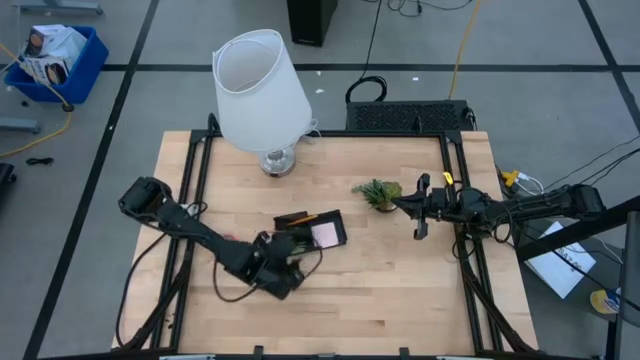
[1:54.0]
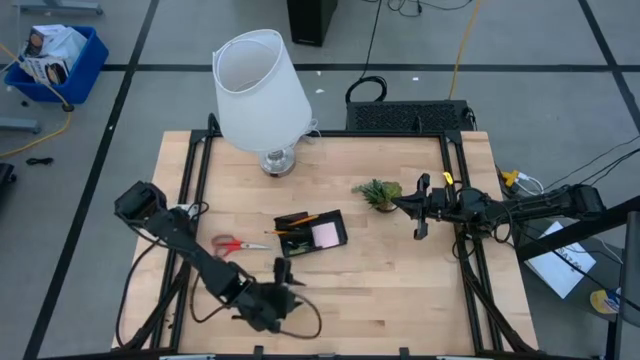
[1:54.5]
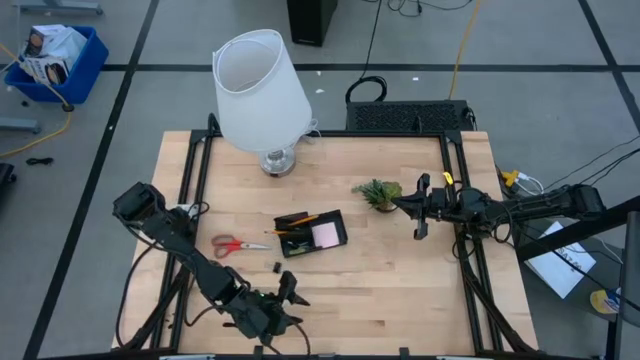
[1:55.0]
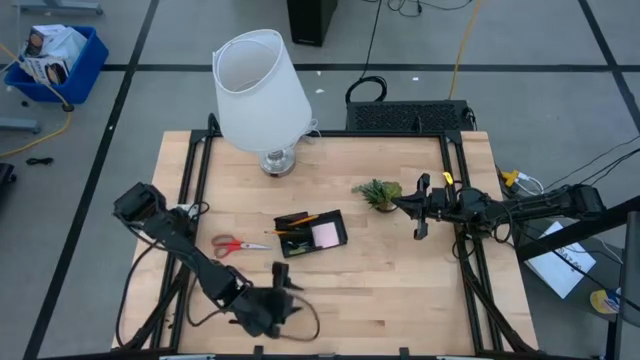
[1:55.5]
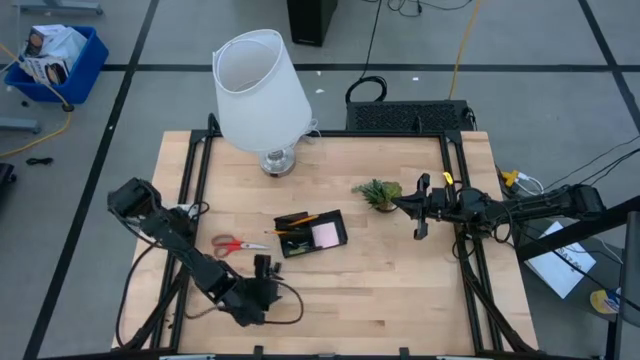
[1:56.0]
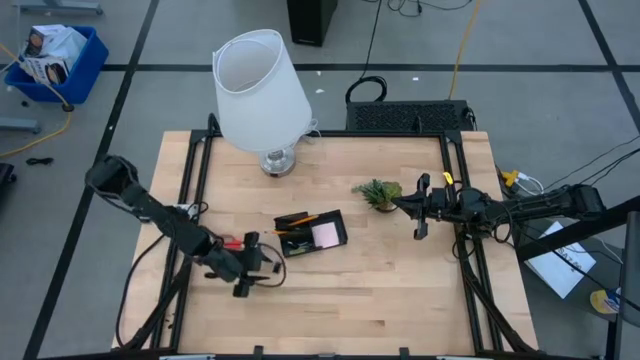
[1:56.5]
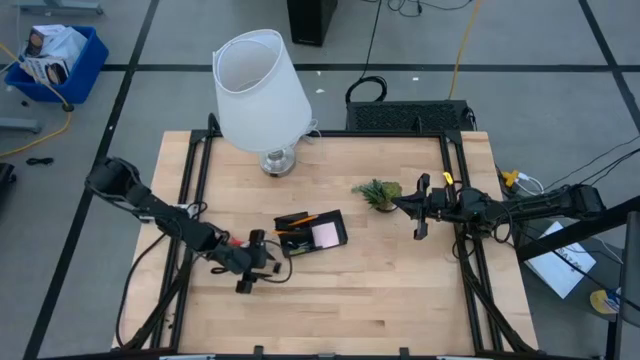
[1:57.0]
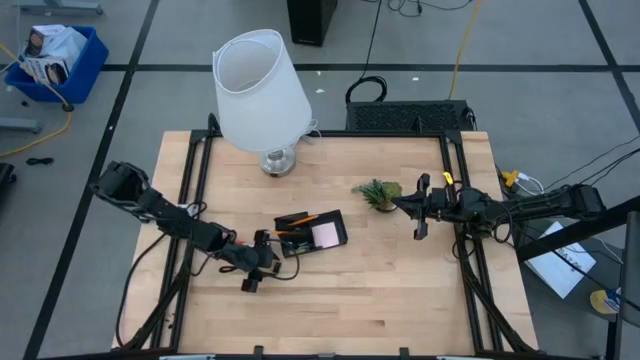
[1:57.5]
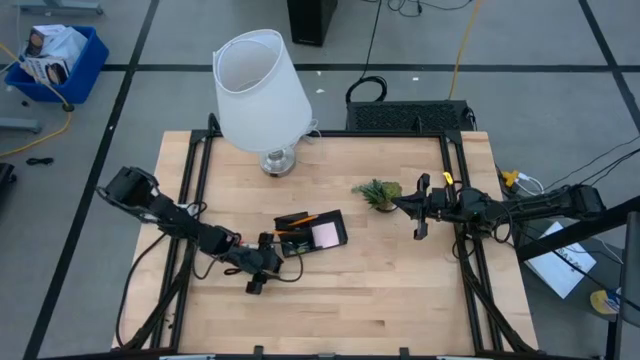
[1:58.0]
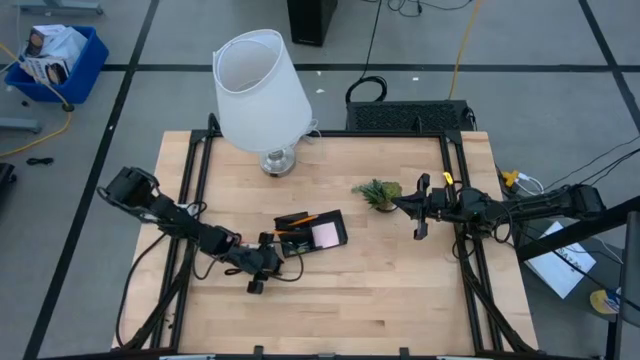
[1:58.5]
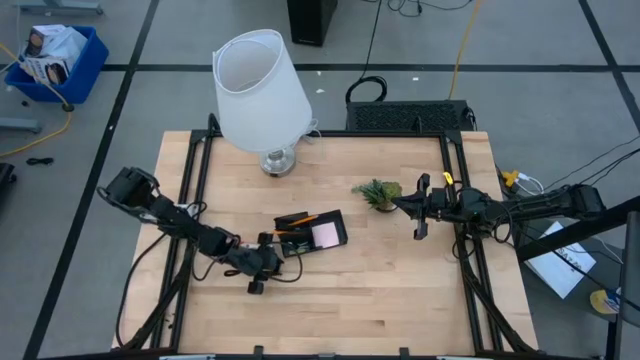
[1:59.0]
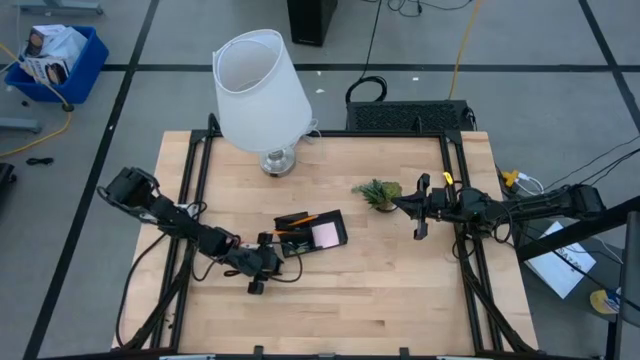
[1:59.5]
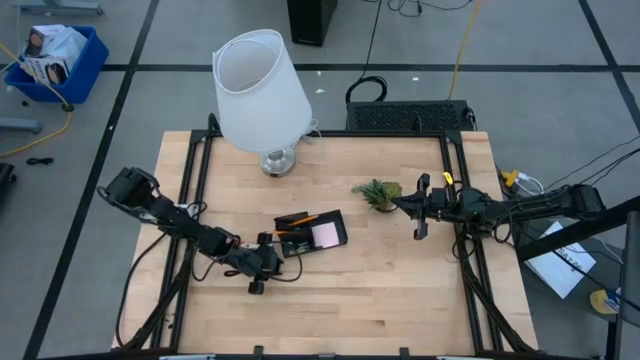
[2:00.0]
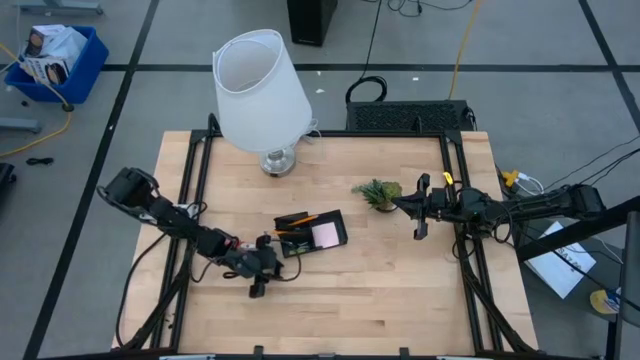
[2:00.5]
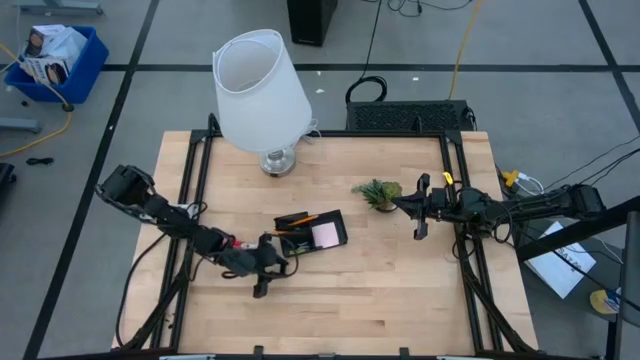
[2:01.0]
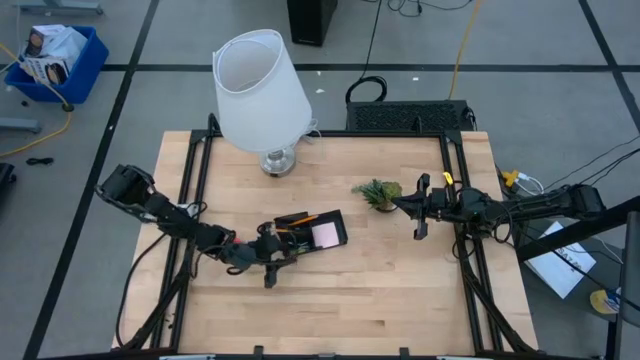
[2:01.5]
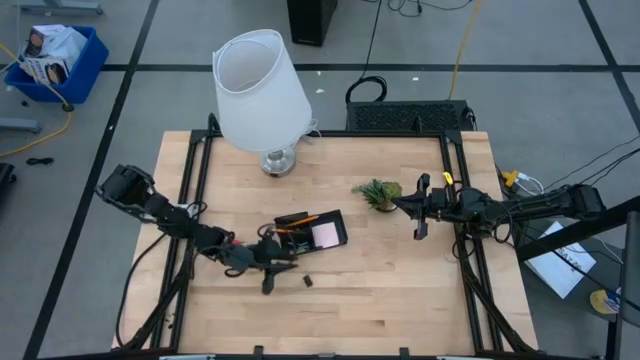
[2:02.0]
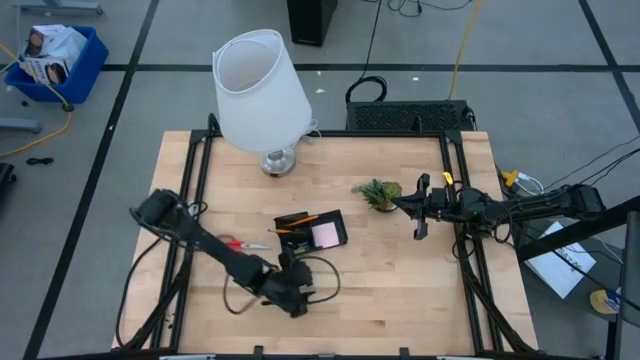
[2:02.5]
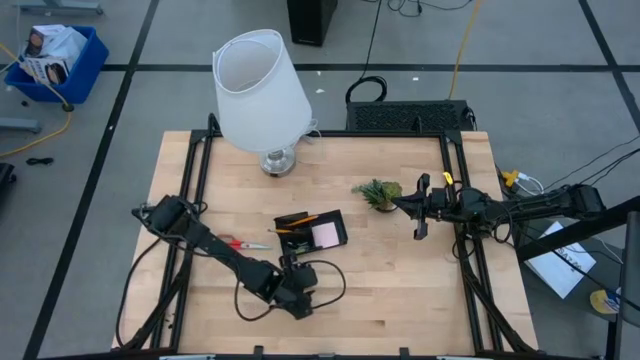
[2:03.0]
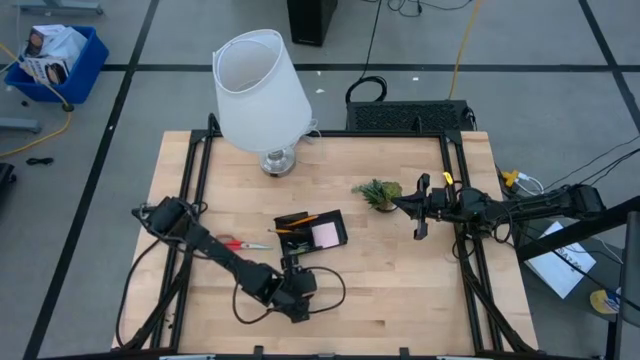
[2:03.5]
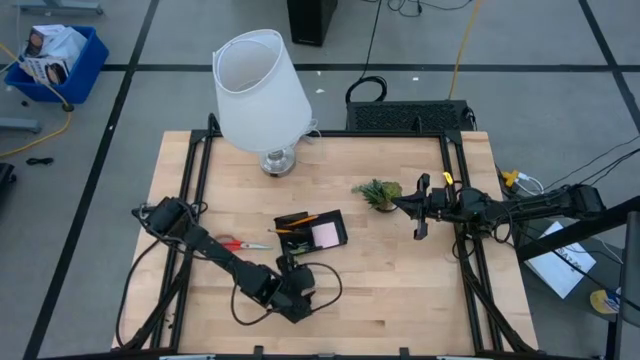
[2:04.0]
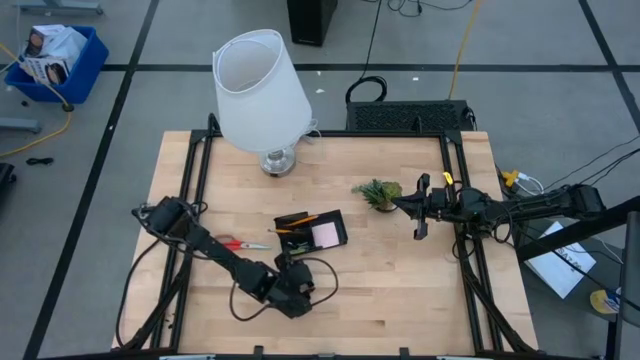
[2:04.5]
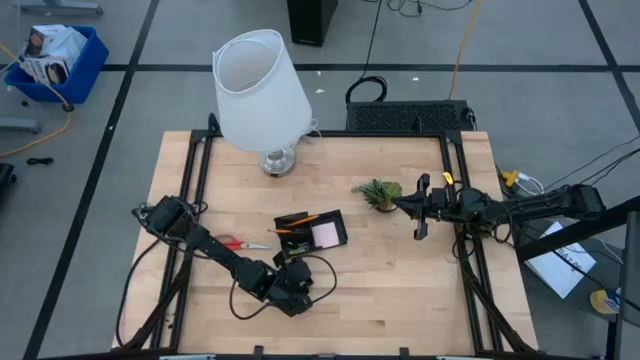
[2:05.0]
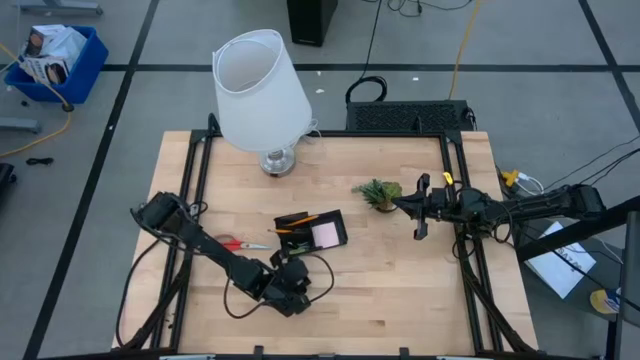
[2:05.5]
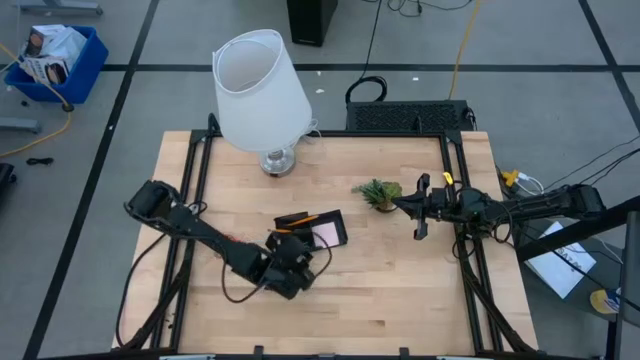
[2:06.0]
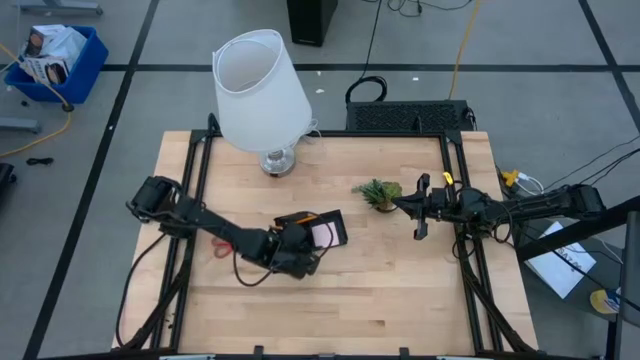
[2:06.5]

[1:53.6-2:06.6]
Task: Pick and place office supplies into organizer
Put the black binder clip into the black desk organizer

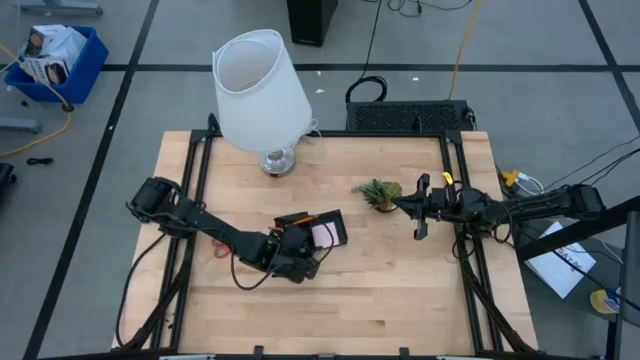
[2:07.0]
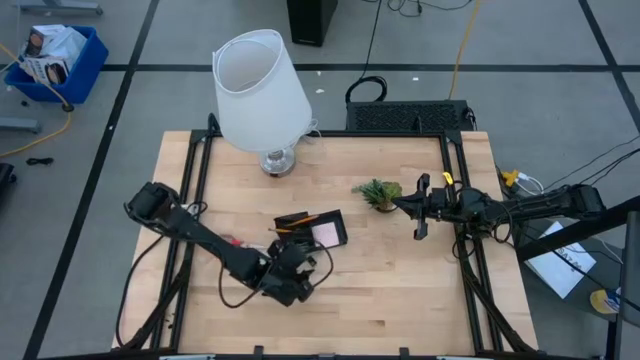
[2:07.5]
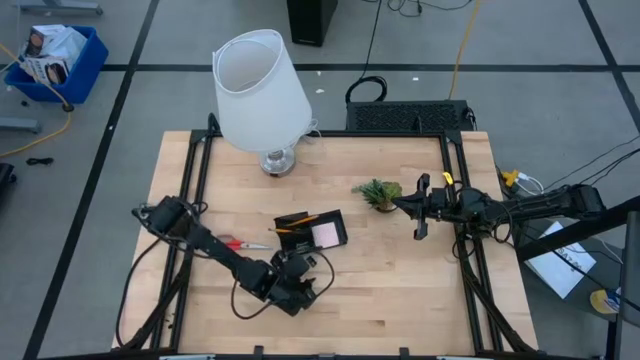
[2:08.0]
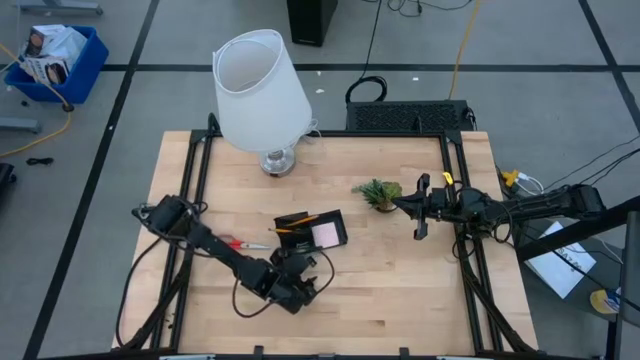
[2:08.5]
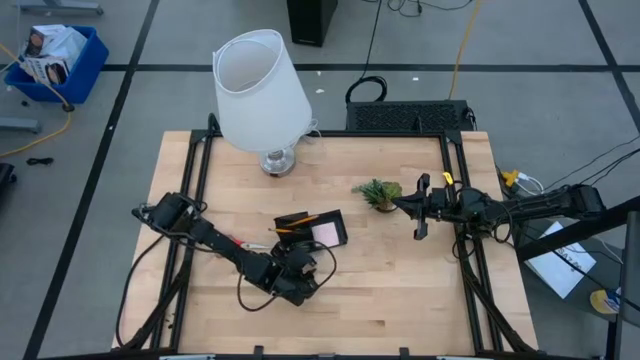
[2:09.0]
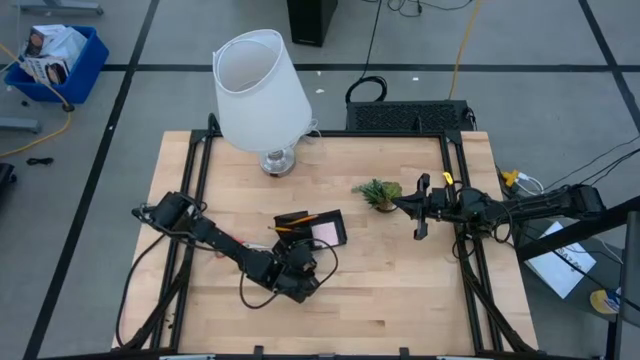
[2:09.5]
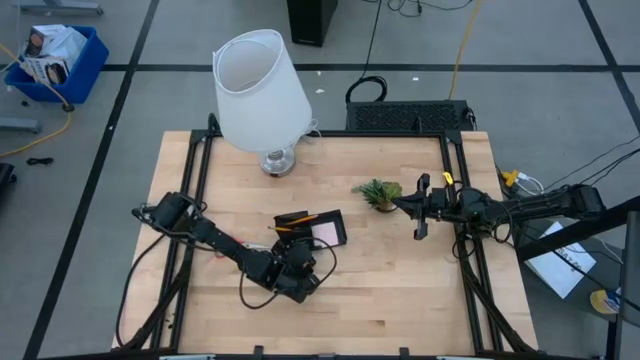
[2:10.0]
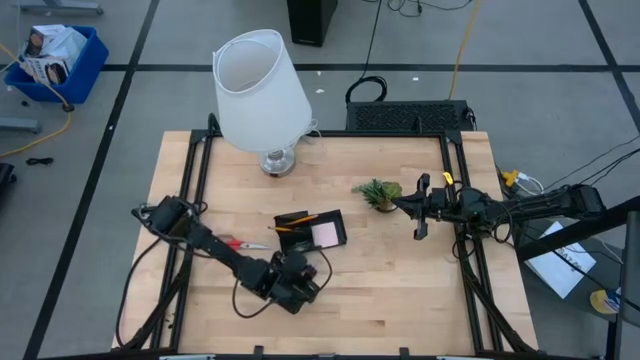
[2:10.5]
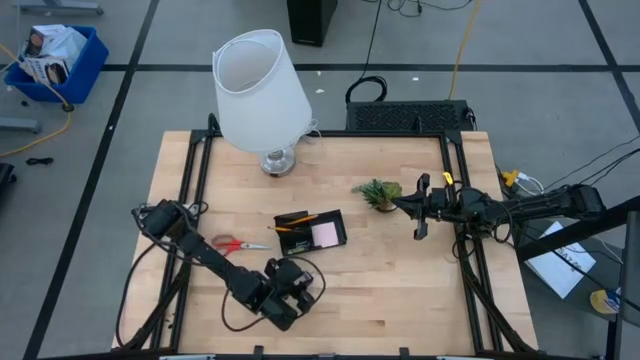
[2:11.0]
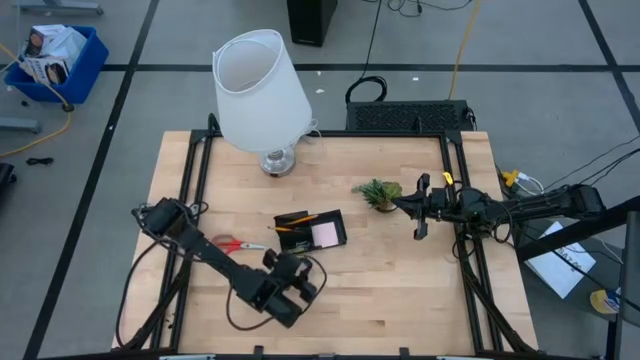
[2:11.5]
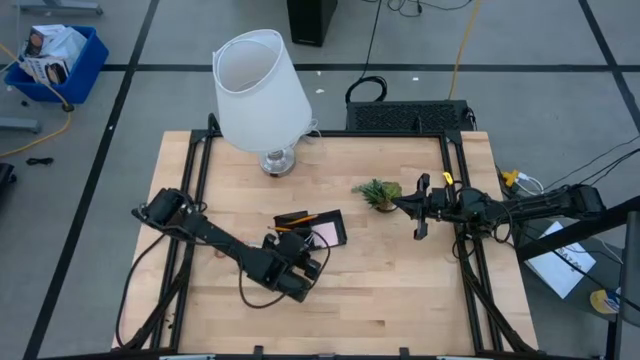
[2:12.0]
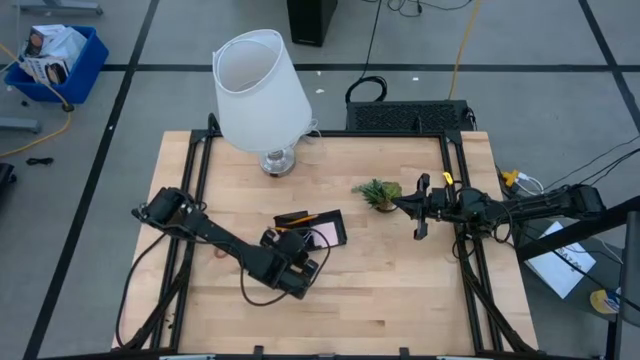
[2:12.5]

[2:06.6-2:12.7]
Put the black binder clip into the black desk organizer

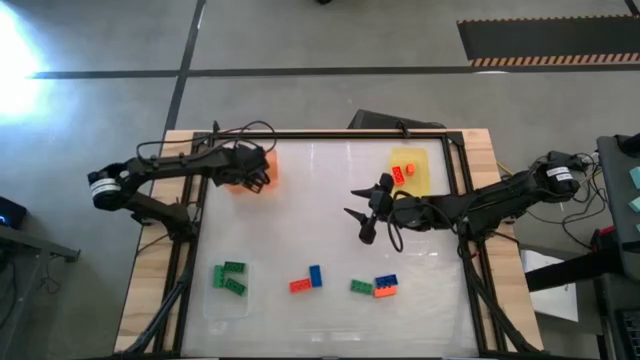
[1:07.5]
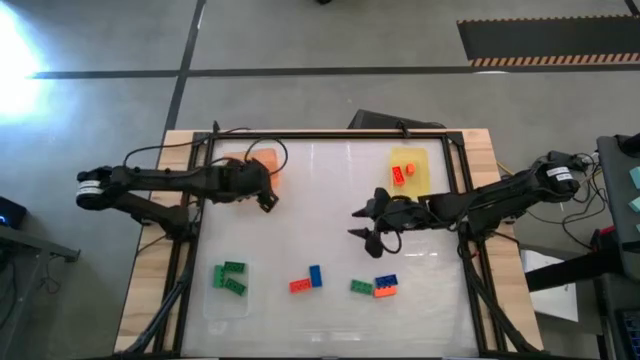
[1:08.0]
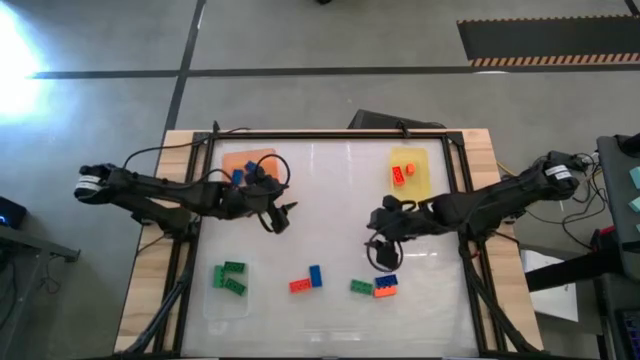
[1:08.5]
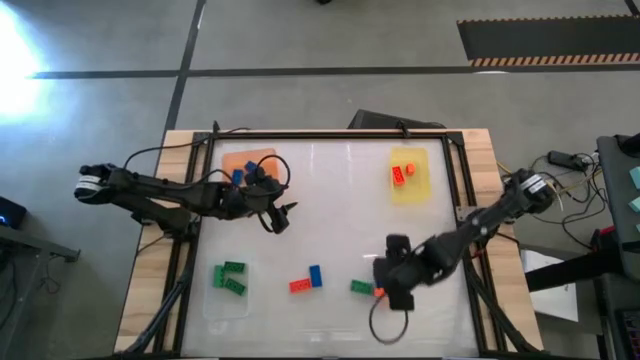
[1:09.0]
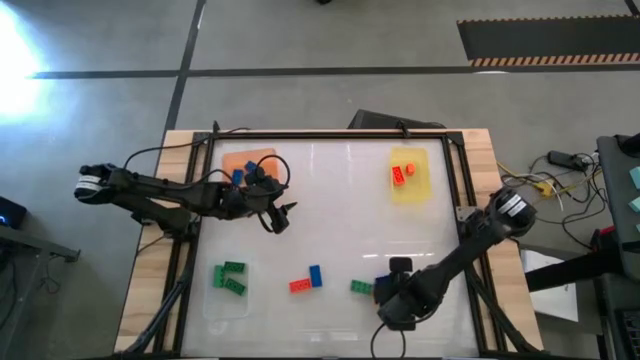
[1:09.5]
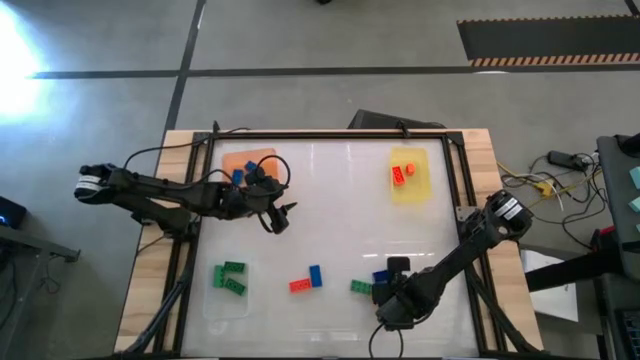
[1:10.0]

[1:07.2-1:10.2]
Task: Sort & place blocks by color
Put the orange game piece into the yellow bin
